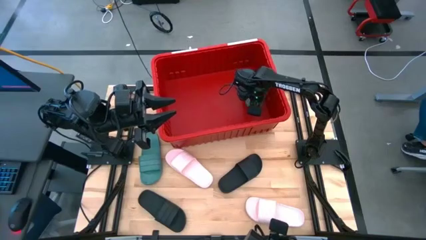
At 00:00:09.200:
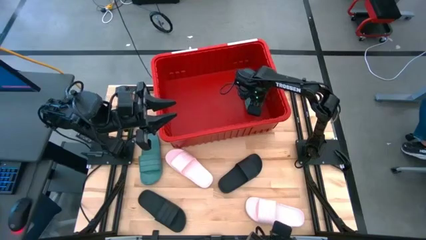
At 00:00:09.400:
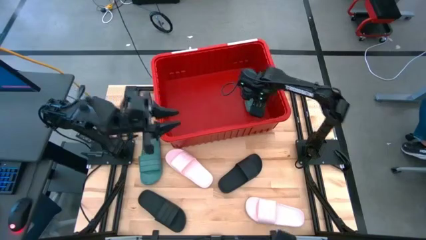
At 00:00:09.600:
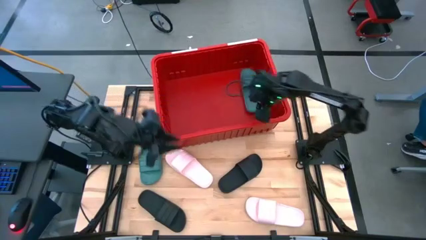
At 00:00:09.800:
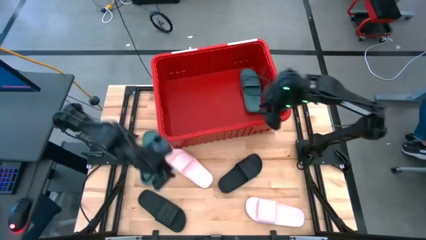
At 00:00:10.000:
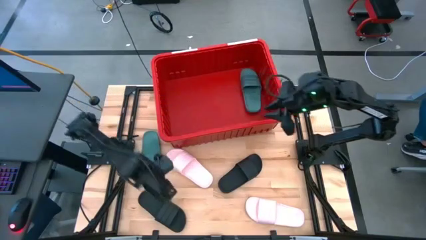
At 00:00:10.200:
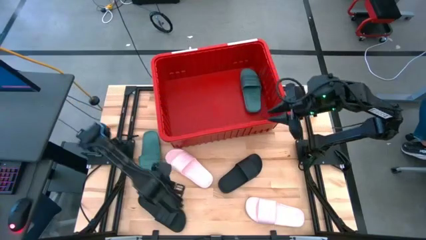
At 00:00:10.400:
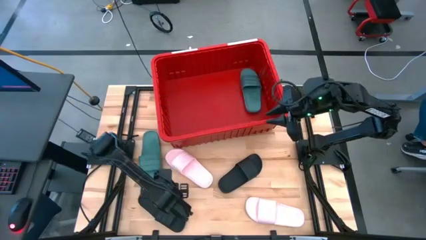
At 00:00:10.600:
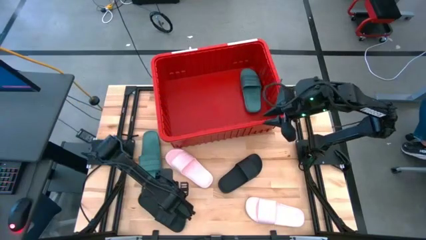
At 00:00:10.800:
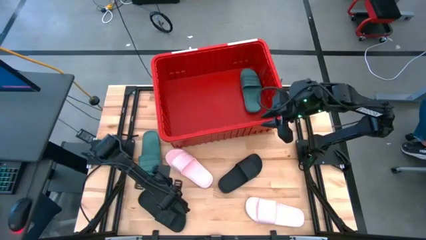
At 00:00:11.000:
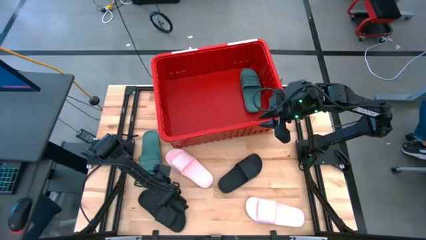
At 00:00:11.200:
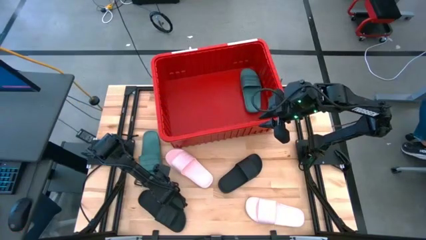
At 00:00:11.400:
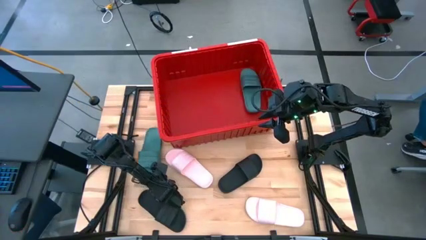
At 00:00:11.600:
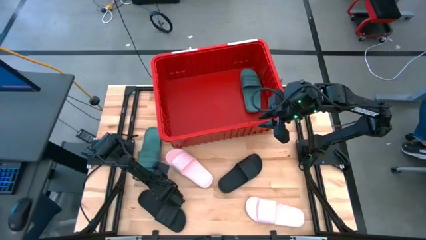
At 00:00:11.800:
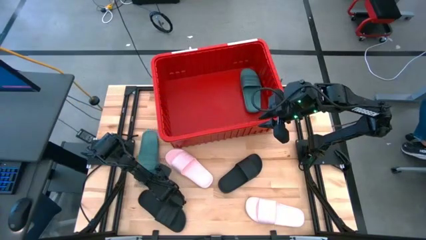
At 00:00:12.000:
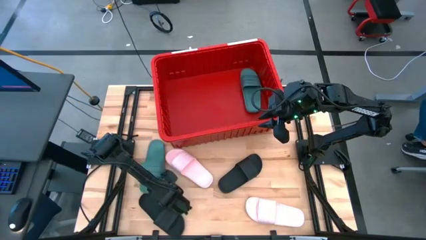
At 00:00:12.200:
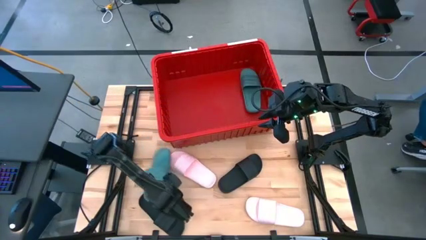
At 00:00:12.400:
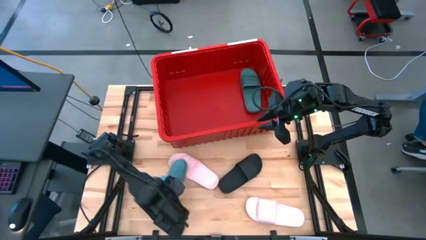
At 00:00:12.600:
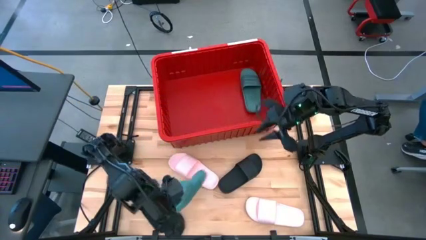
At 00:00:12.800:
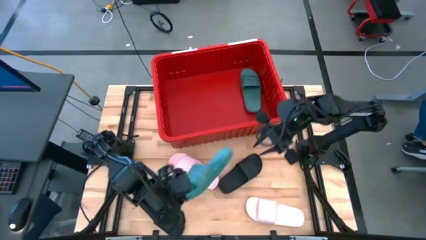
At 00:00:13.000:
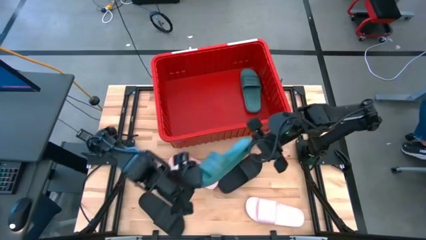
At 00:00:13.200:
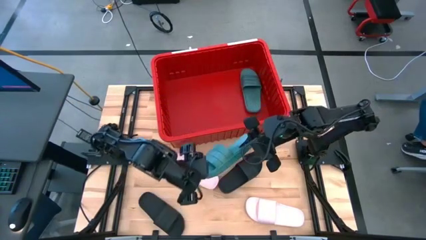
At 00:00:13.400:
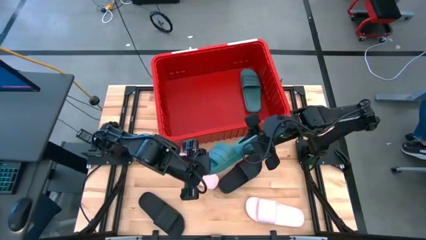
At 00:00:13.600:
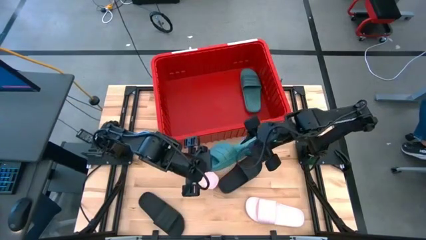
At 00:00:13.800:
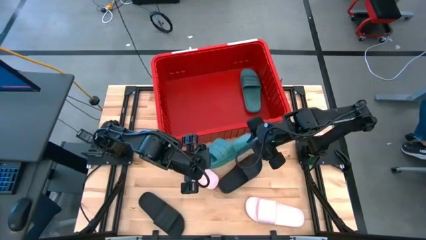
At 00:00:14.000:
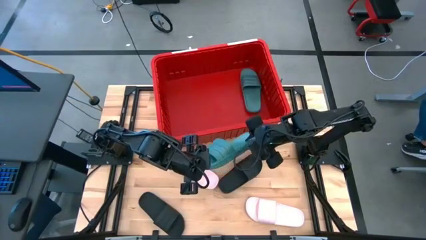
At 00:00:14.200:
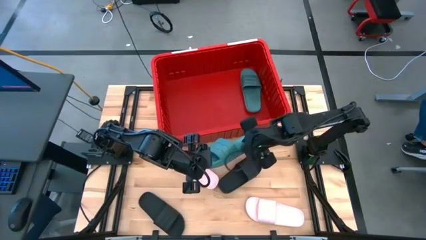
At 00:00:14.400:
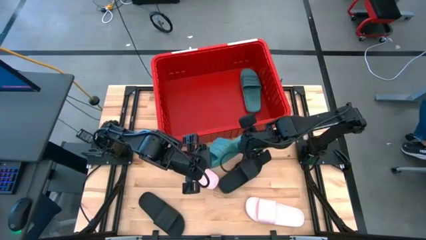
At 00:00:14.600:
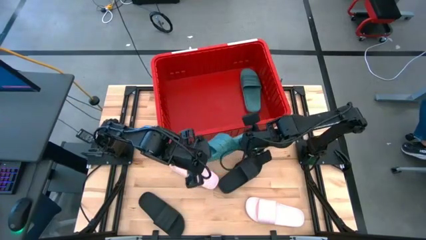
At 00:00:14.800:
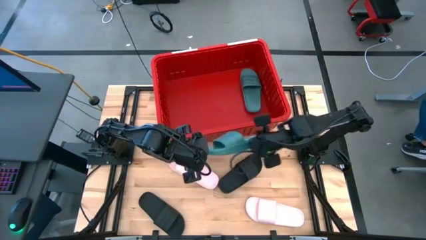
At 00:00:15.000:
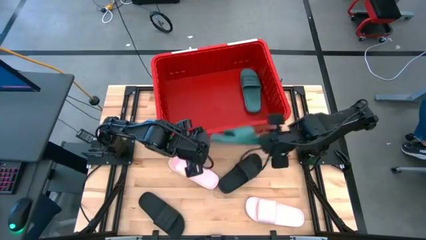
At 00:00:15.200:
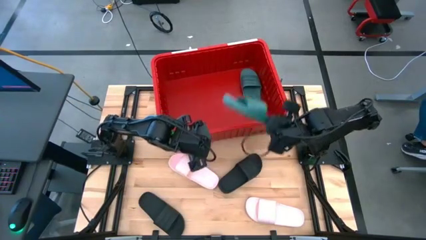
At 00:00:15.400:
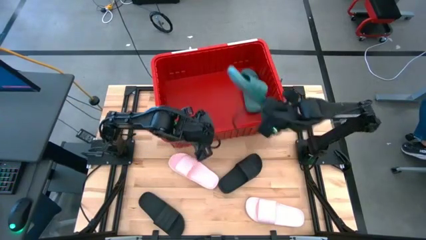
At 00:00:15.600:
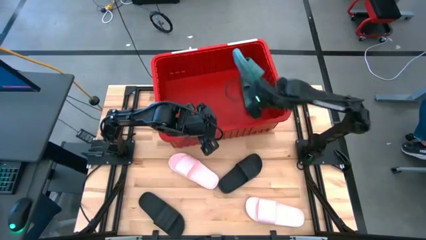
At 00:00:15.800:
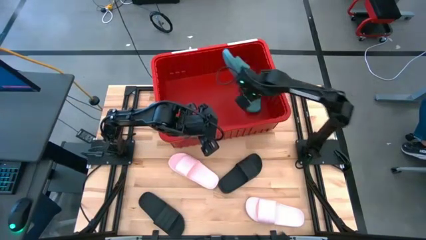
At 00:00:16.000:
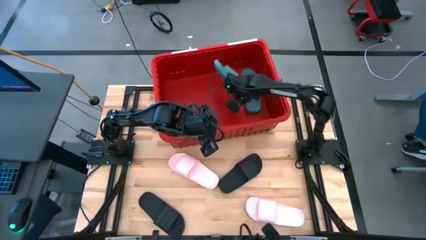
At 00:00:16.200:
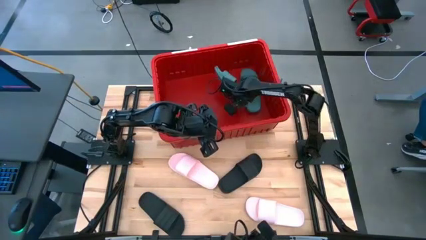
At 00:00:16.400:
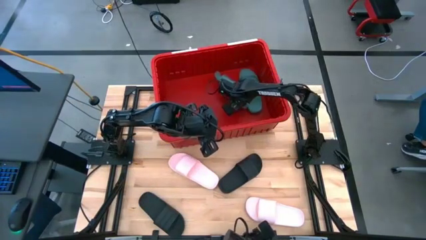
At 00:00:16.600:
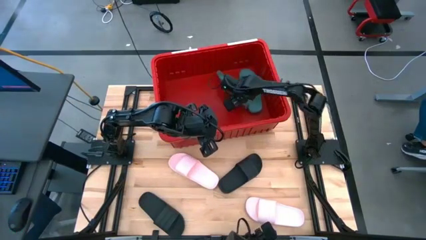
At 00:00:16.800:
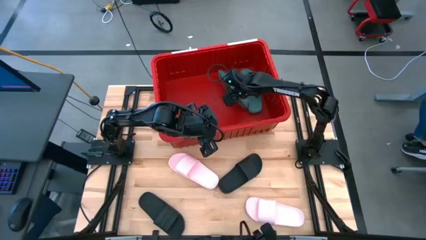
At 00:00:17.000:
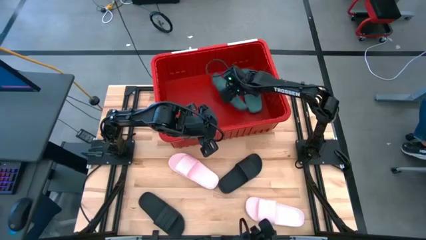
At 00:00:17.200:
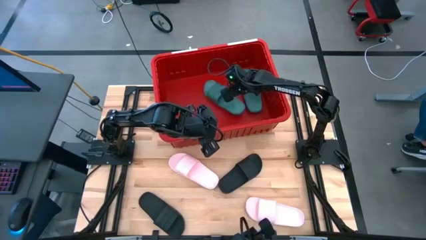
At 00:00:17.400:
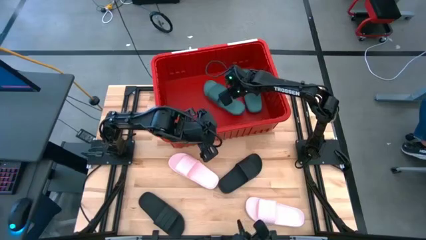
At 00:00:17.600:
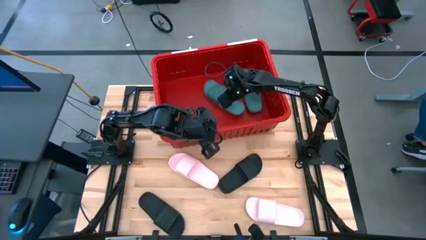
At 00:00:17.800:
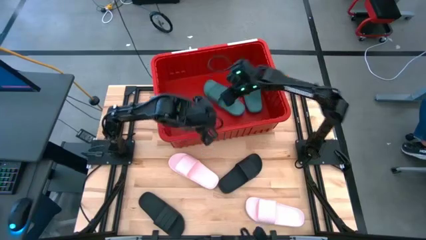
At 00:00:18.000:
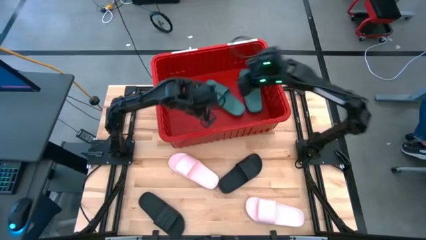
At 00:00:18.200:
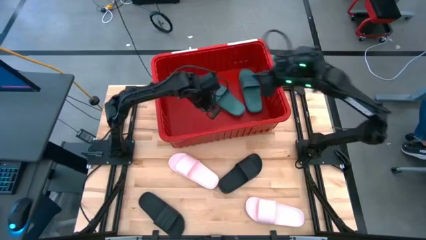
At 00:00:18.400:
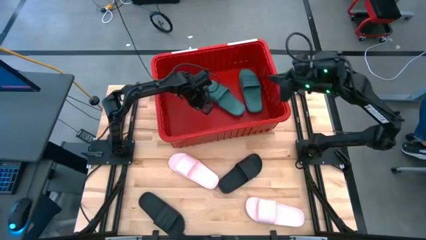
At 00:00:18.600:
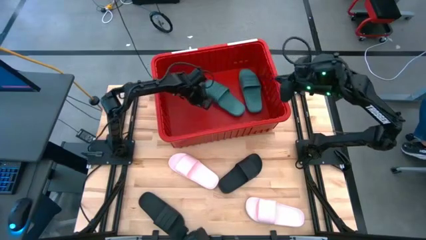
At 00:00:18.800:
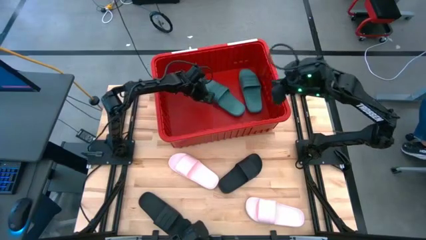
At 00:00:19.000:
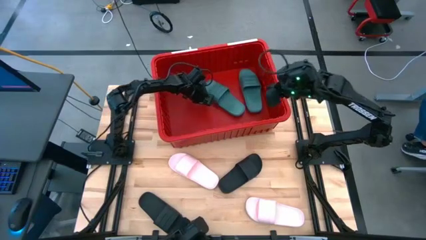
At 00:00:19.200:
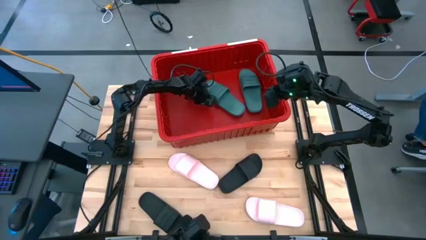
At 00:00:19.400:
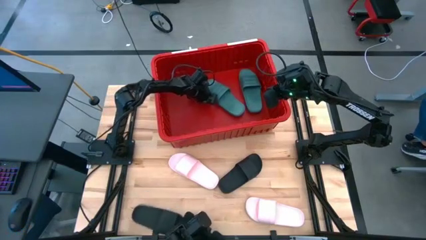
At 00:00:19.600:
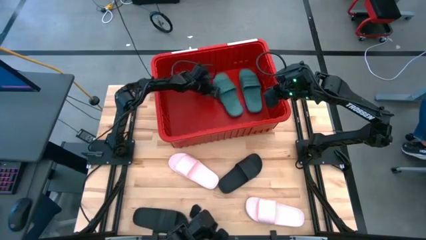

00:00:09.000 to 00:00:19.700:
Task: Pick and place slides into bin
Put the green slide into the red bin

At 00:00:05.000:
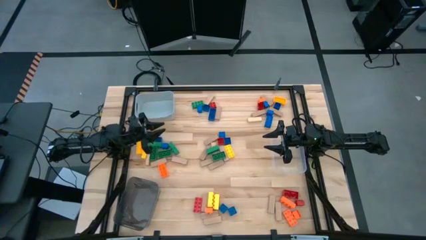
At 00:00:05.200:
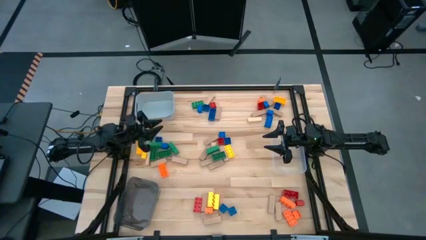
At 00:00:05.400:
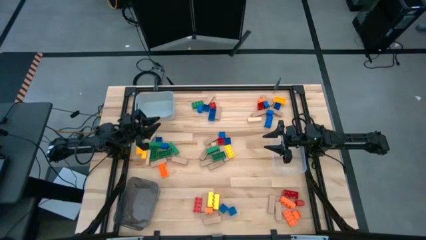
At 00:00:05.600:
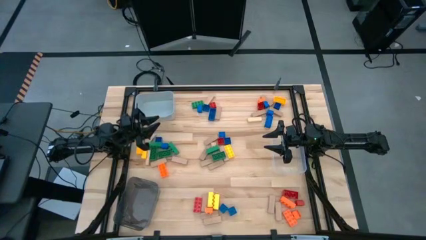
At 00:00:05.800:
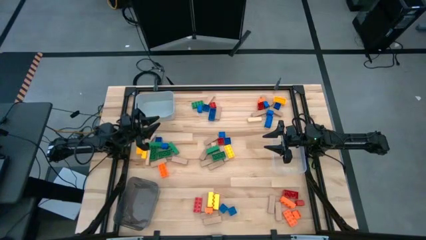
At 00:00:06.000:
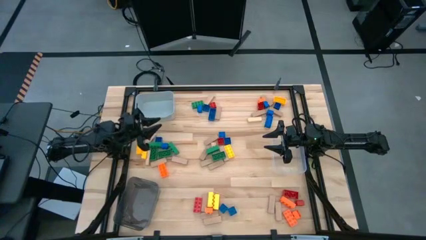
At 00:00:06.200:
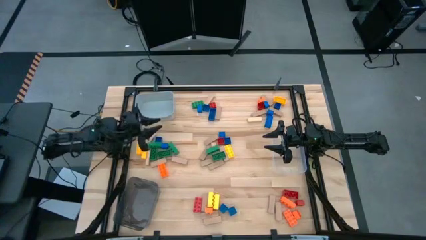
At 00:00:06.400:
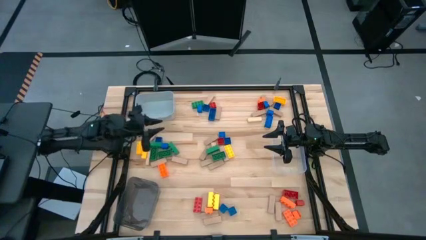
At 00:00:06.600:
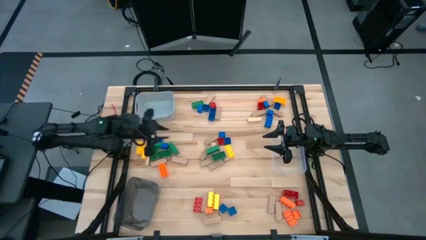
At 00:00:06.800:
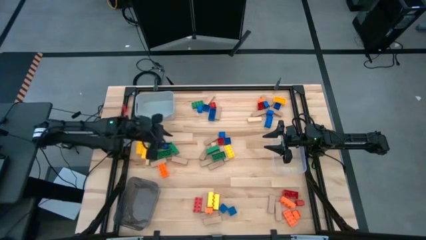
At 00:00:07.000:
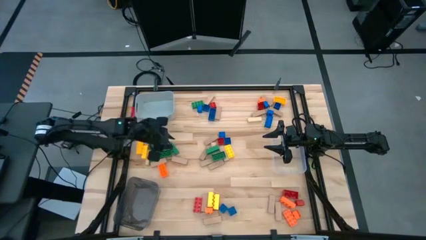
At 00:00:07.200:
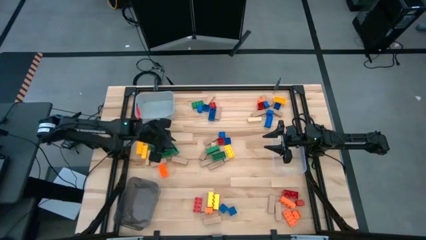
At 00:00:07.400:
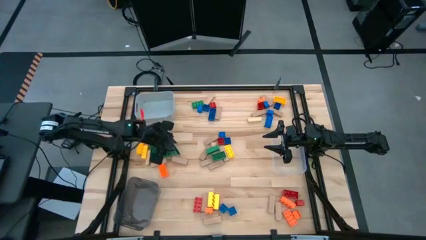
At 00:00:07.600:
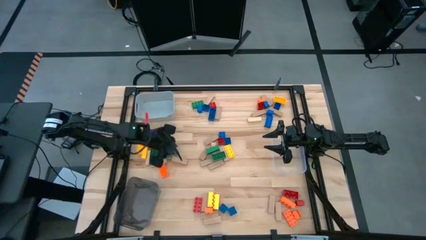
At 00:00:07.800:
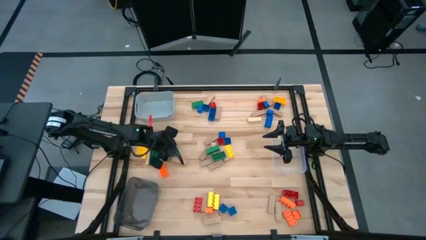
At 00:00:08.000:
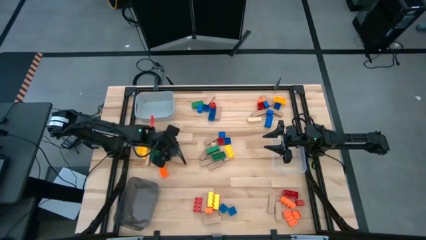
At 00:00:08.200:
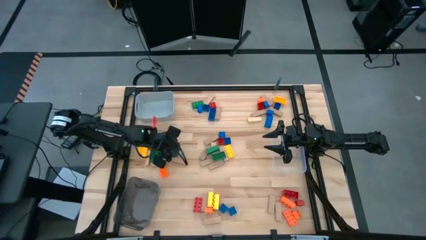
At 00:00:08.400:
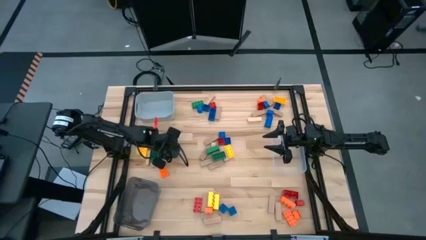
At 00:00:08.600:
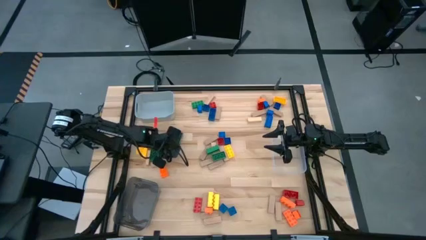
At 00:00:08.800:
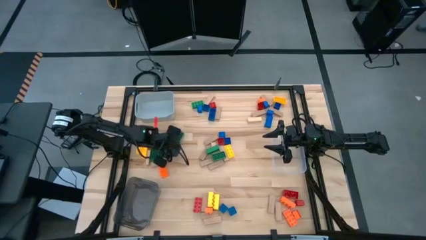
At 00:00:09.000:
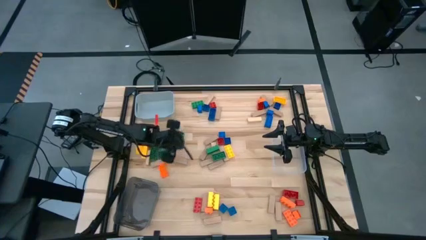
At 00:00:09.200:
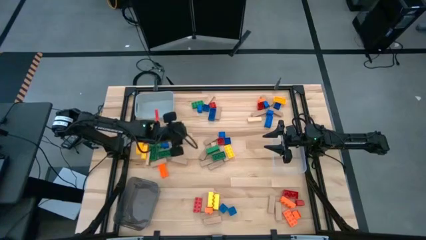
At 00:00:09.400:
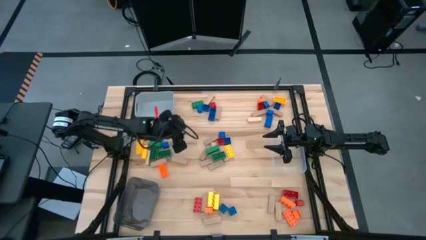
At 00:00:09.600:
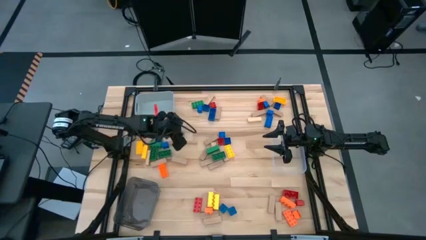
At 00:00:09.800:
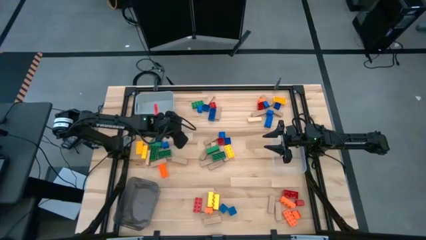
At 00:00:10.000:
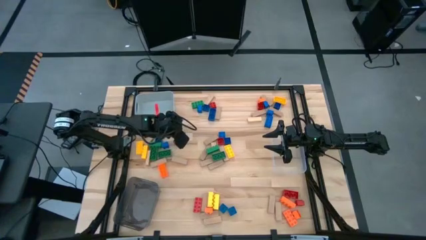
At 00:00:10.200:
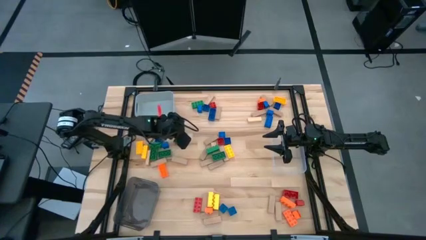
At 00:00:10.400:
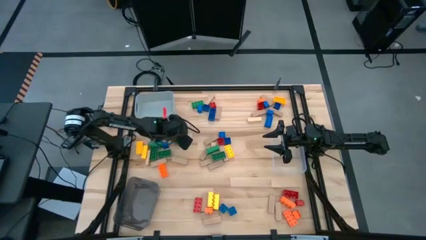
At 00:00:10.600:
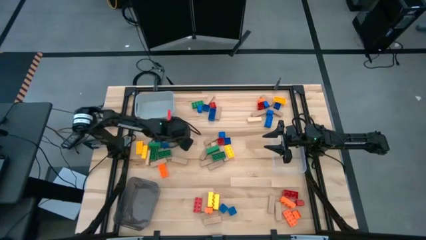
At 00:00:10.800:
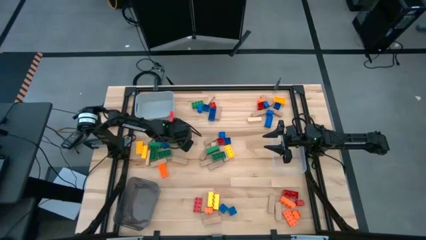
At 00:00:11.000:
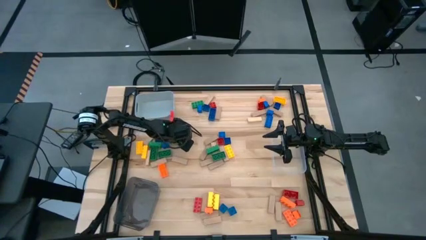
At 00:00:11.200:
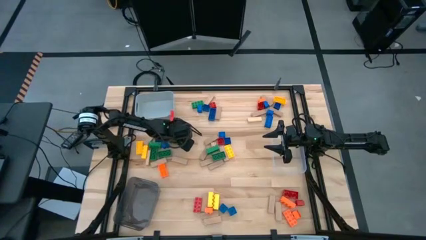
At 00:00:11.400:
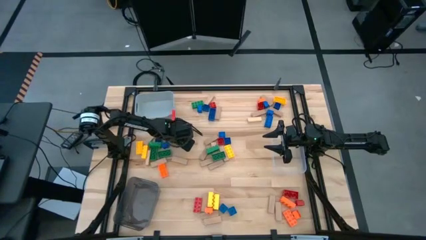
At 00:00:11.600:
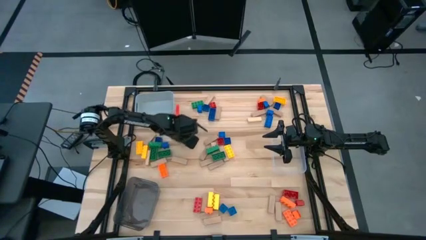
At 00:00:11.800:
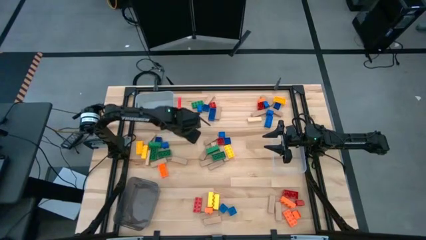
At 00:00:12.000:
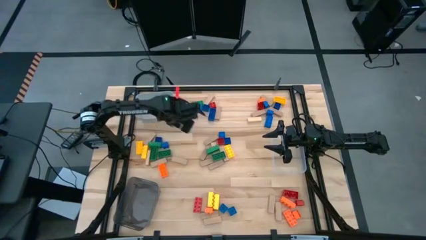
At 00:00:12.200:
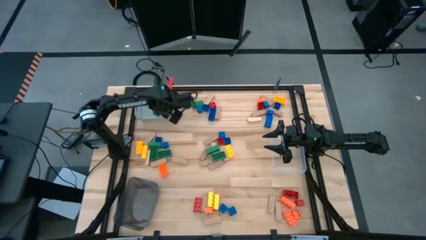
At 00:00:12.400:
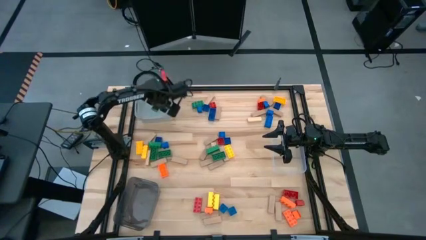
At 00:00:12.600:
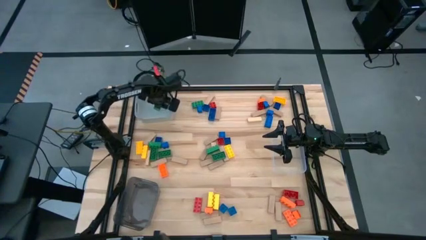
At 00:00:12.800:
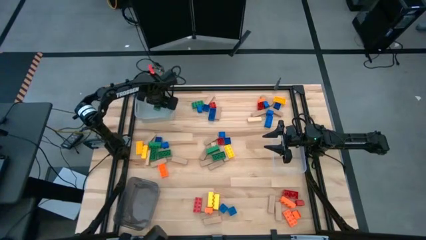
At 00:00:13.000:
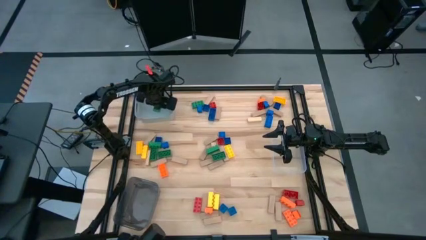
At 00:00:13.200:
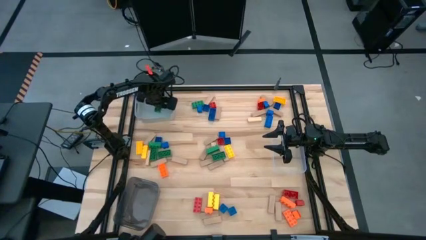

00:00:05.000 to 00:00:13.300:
Task: Sort blocks by size
Put the large green game piece into the gray bin
